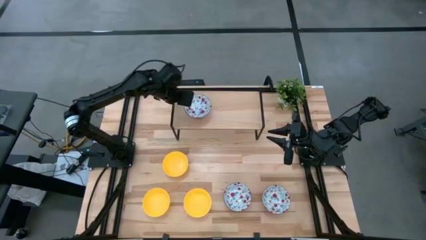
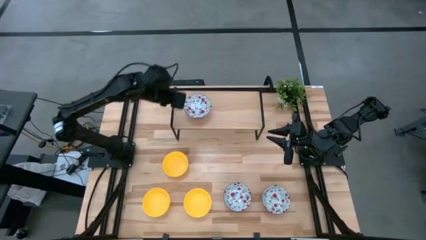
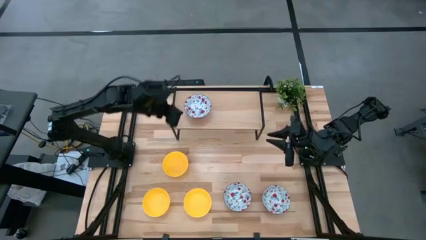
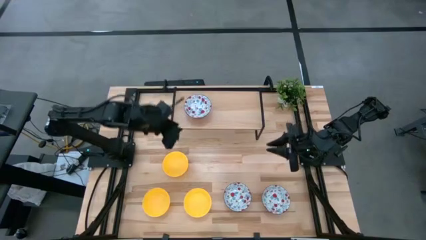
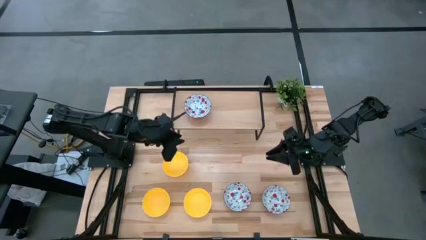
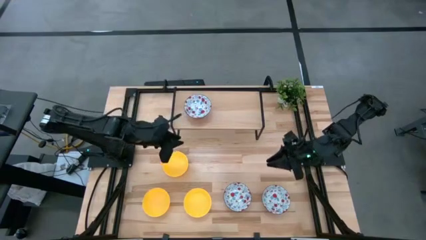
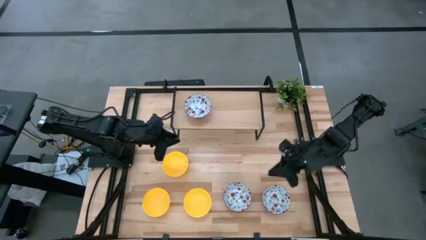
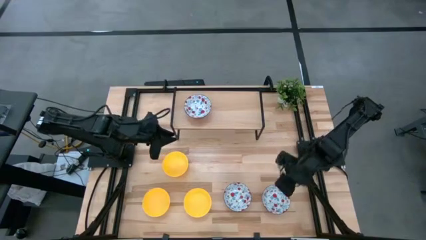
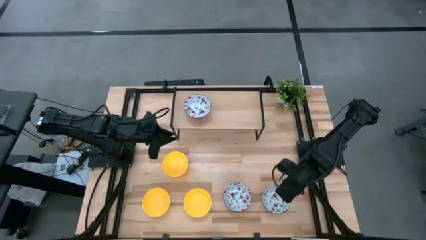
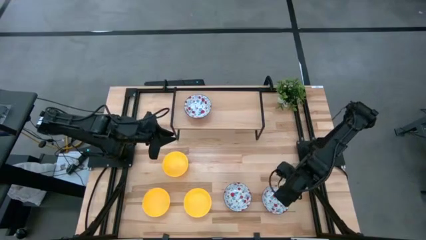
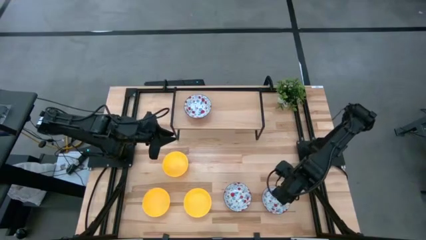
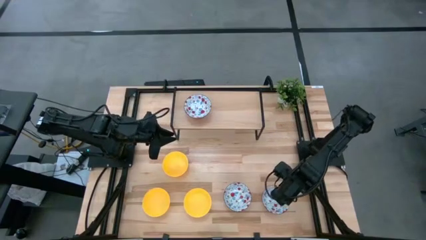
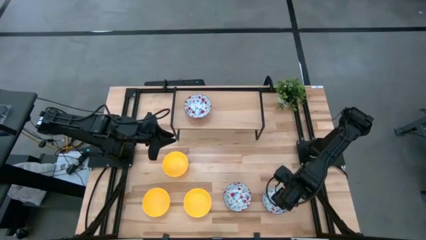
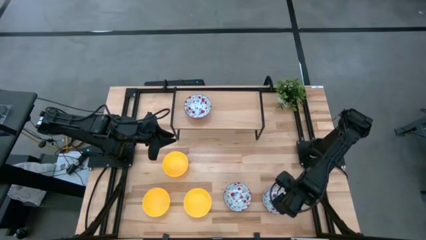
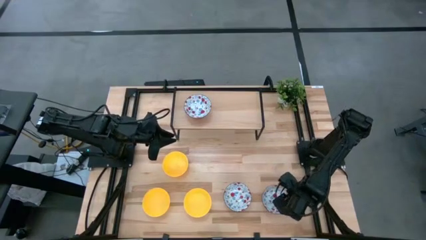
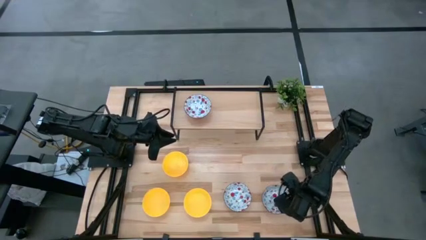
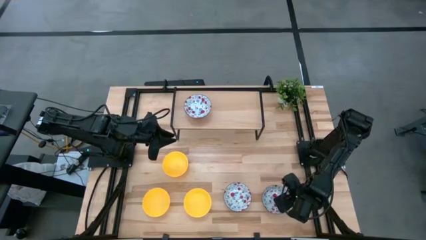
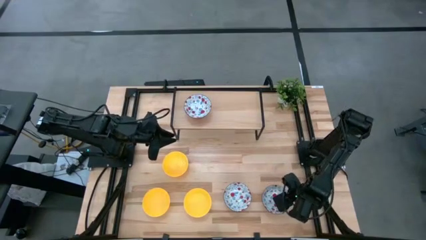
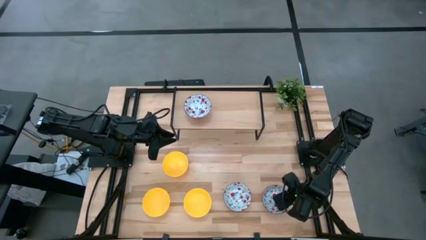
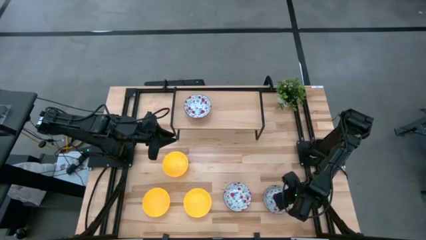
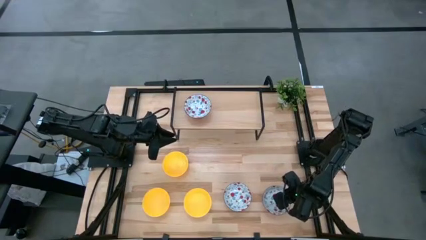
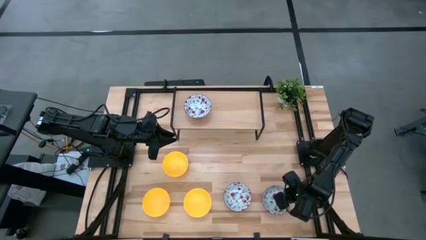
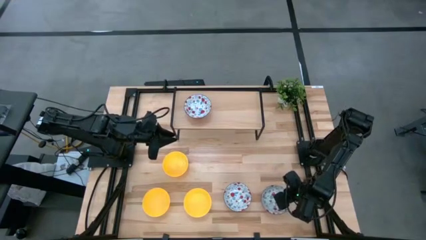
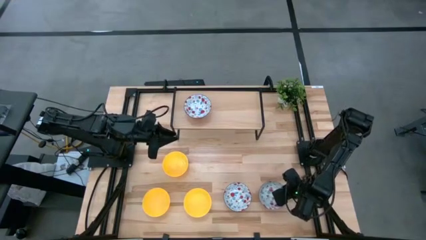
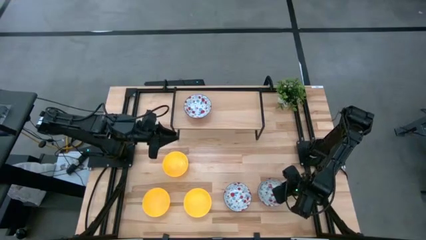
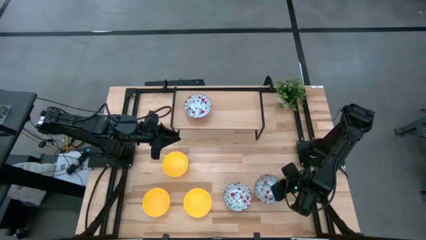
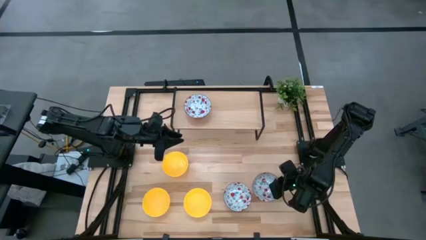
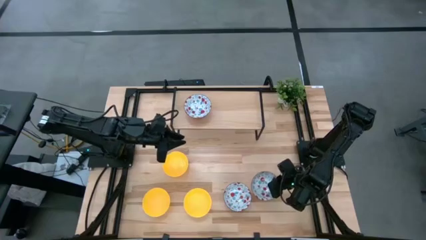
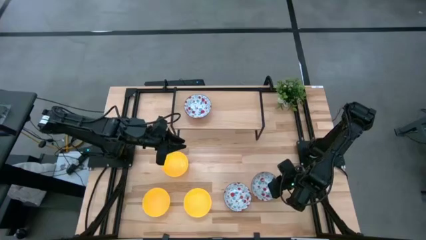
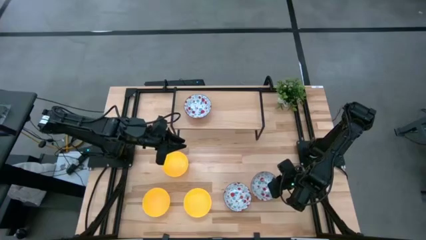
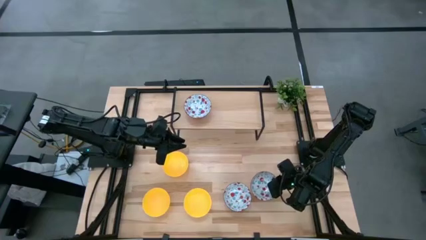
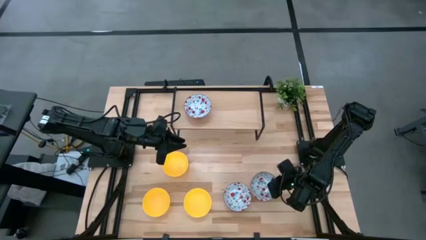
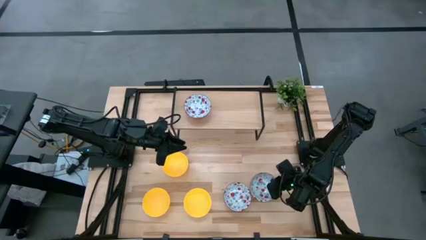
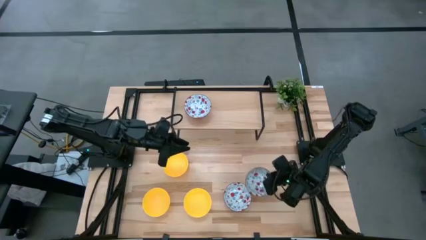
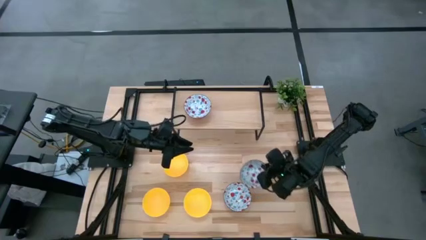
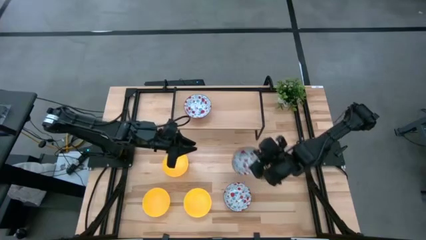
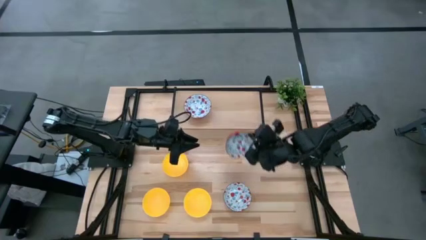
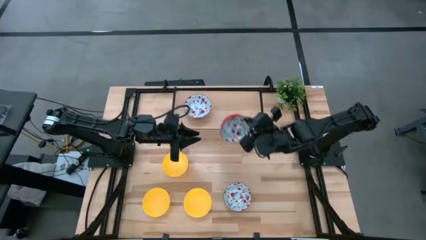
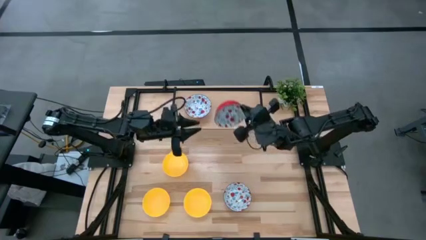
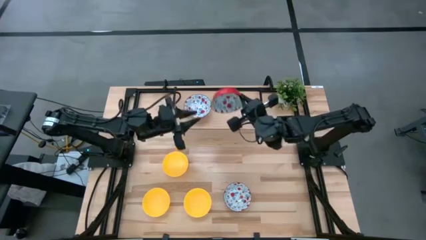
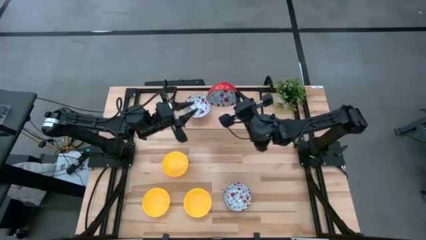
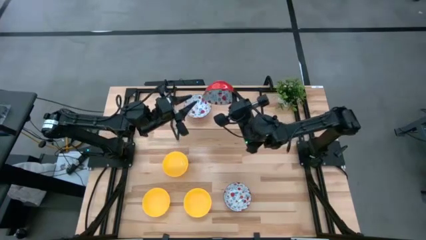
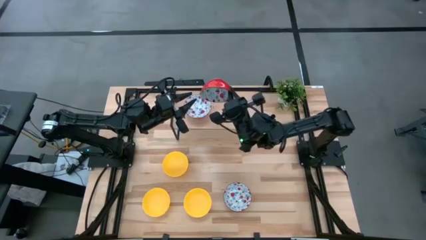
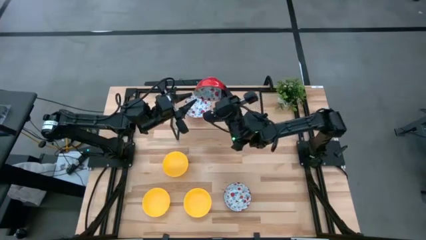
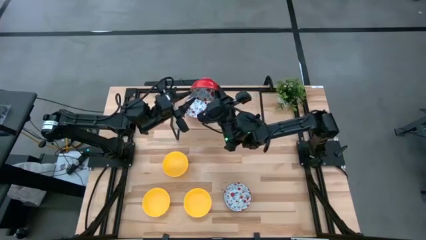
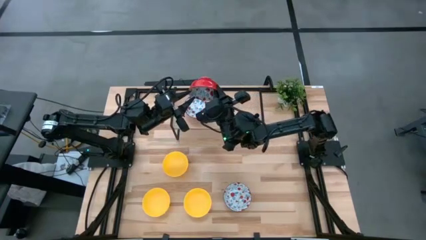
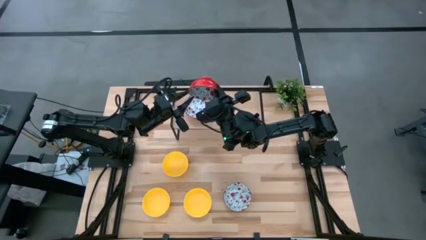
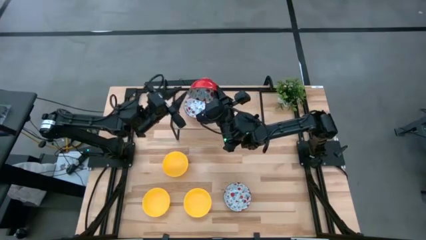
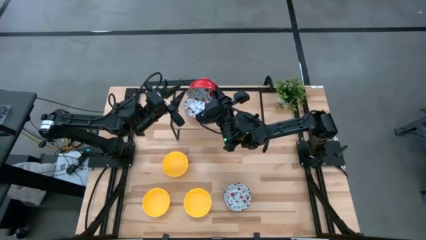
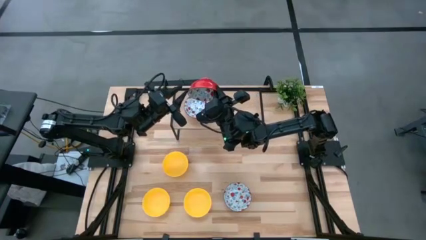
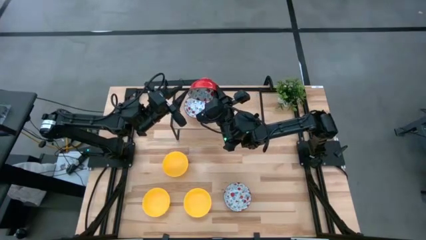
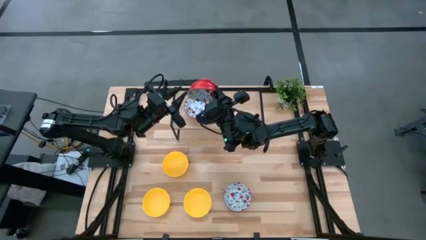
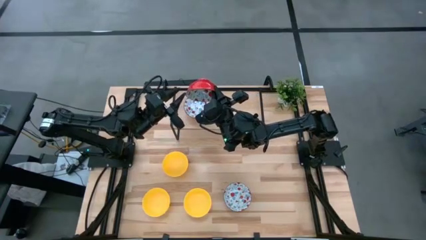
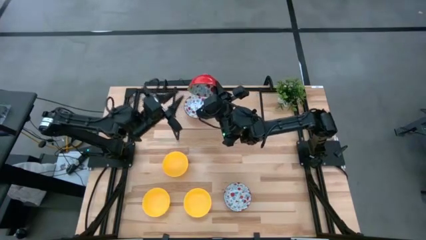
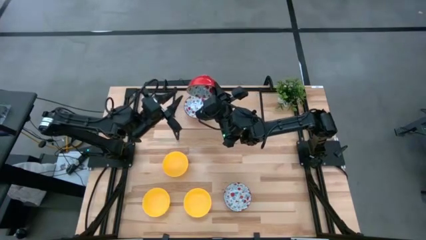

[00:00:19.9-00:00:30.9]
Task: Pick & Place Mini bowls
Stack the right white patterned bowl on the white patterned bowl on the shelf
